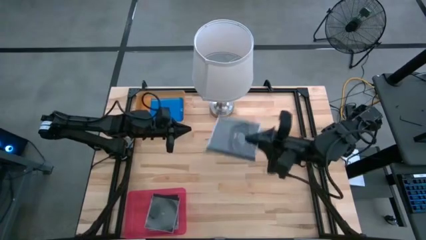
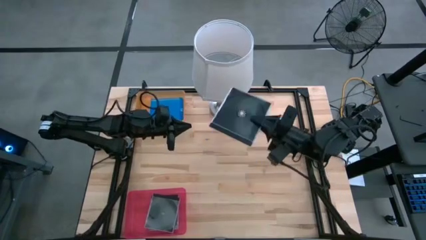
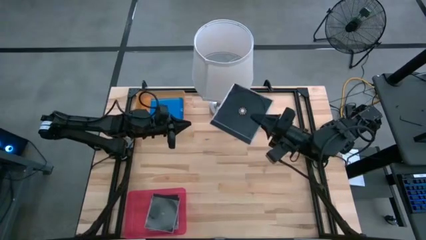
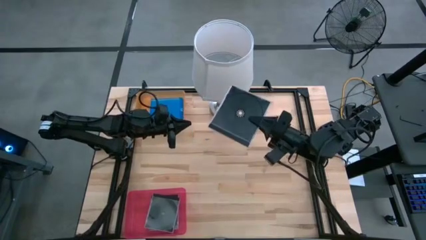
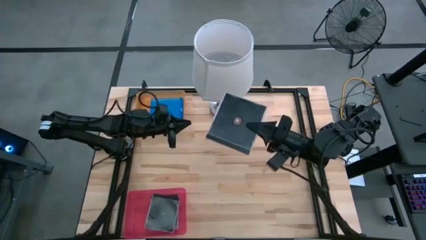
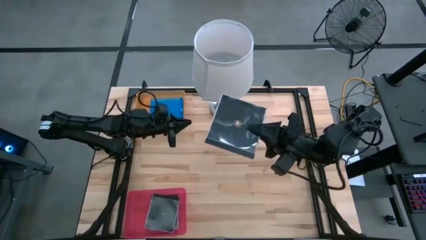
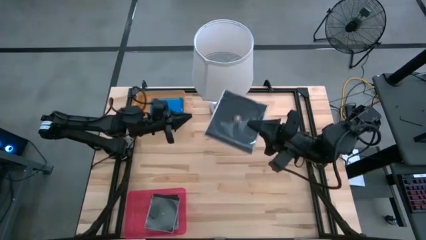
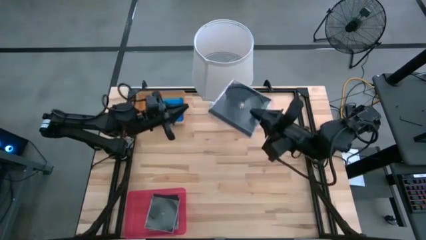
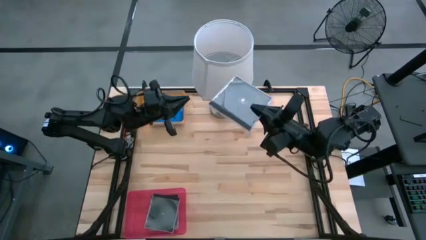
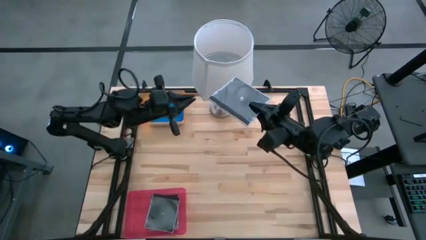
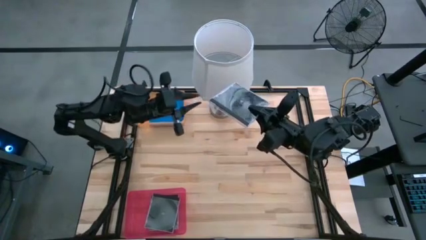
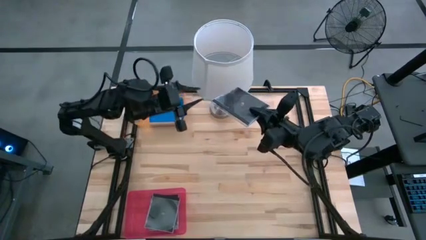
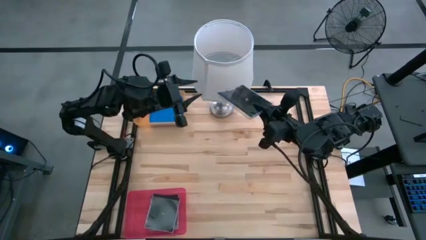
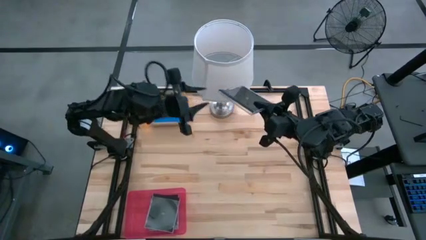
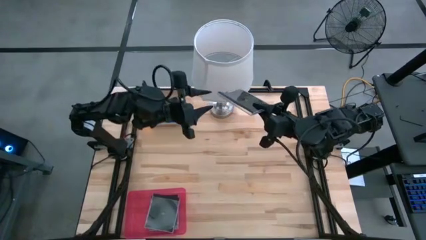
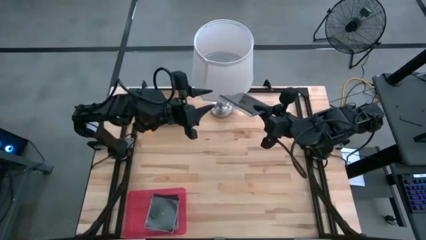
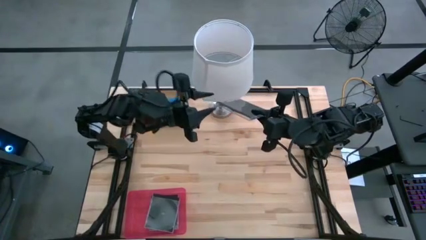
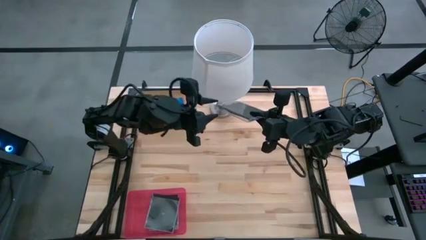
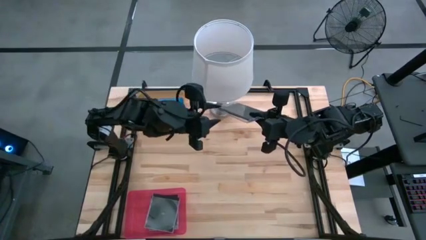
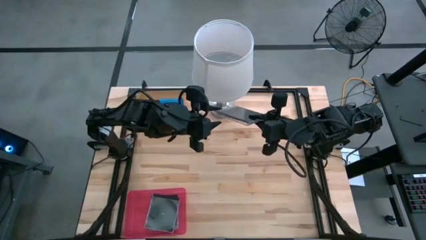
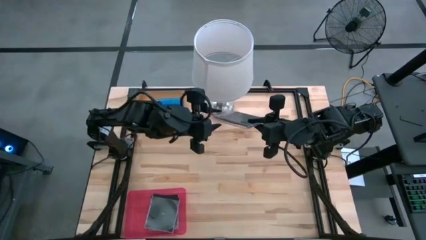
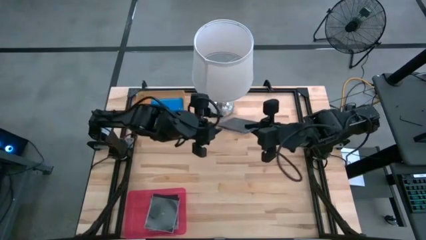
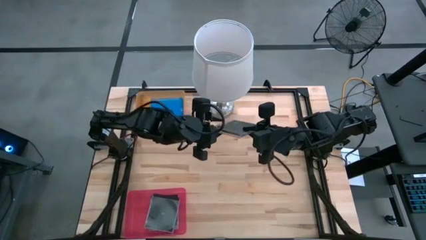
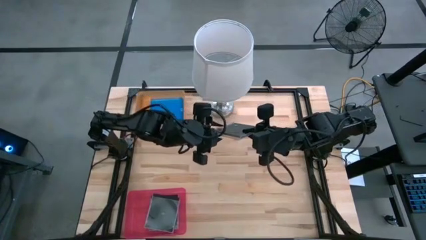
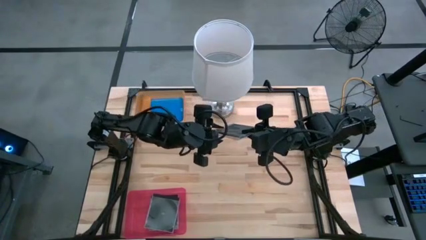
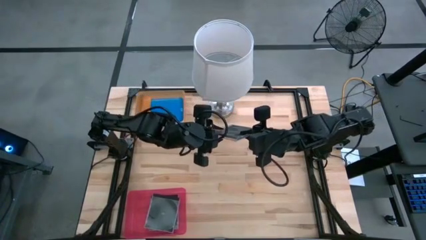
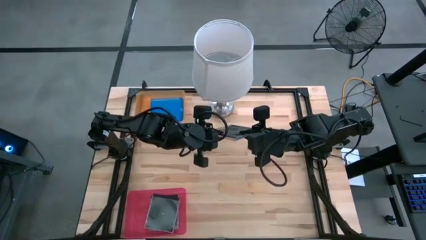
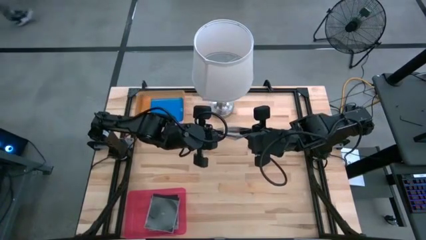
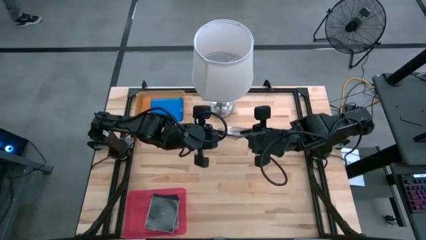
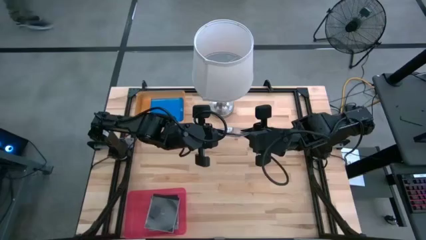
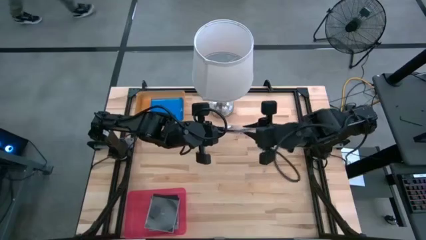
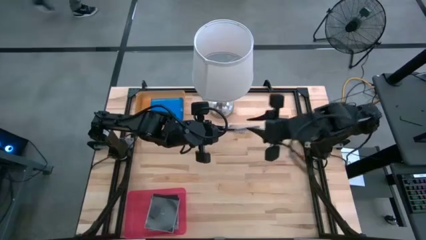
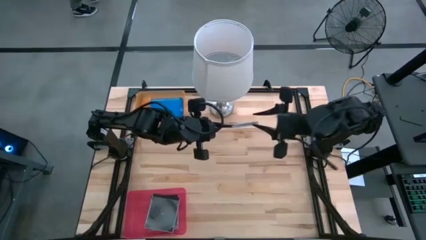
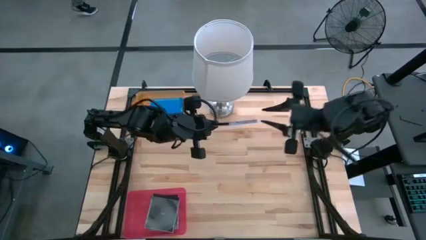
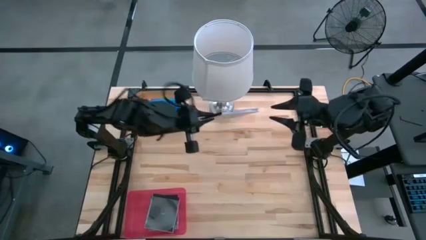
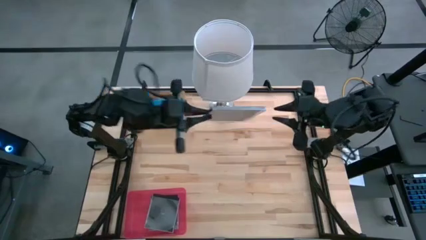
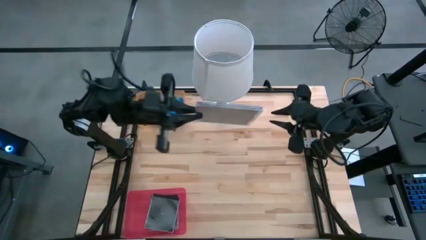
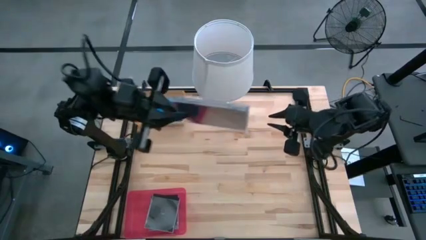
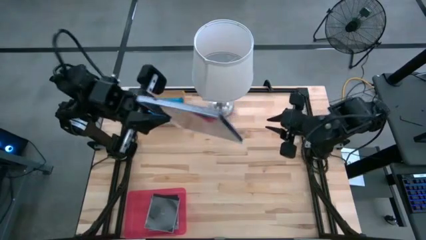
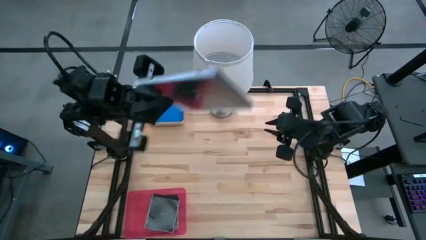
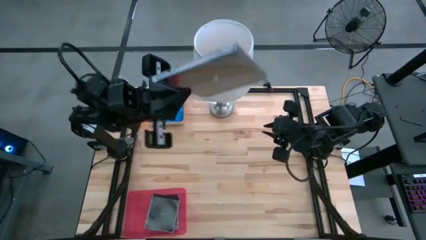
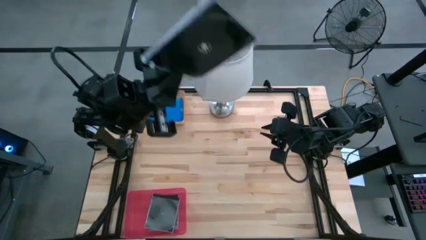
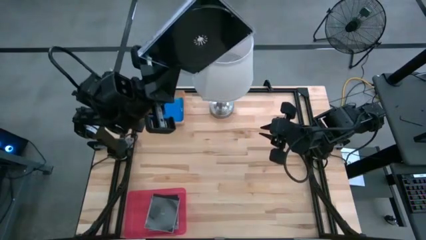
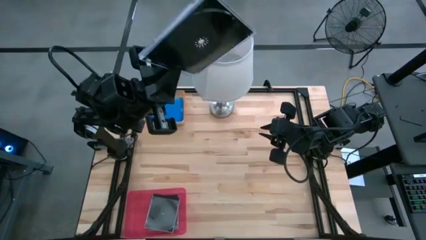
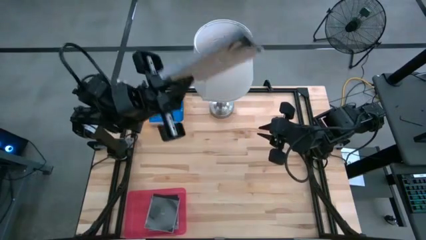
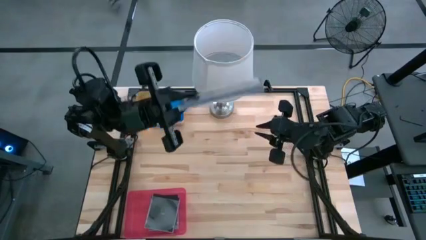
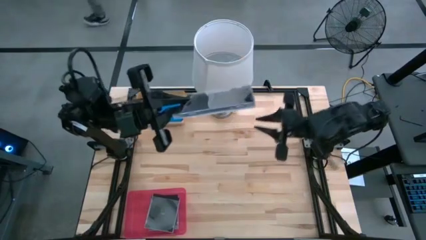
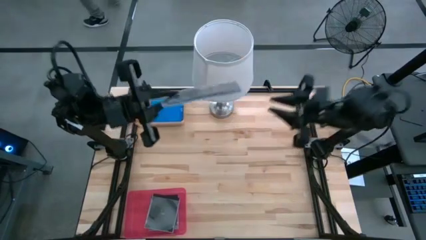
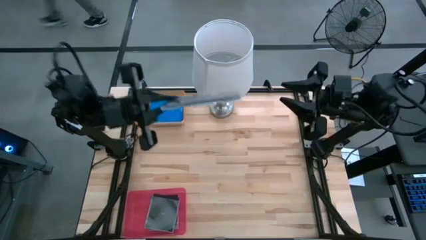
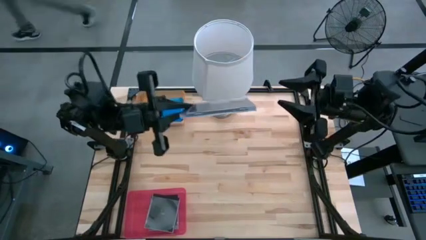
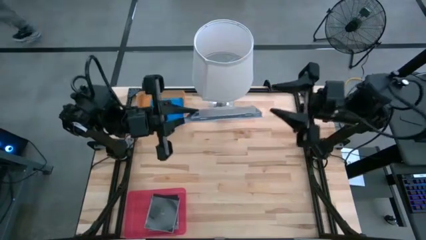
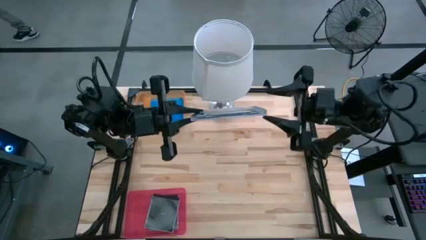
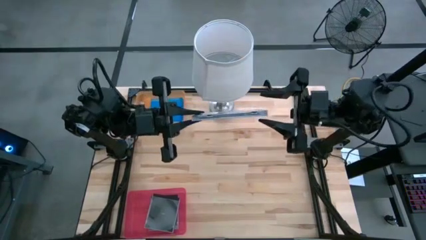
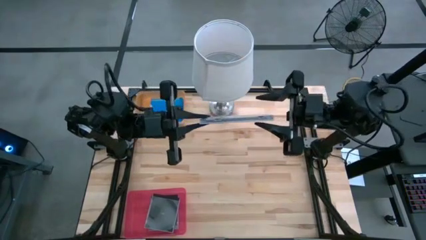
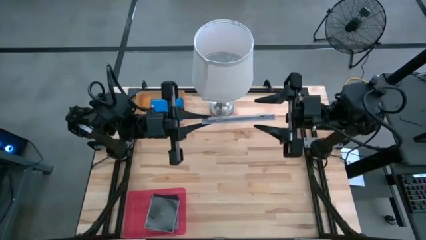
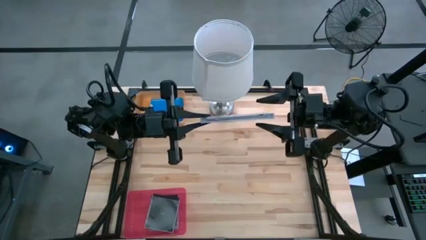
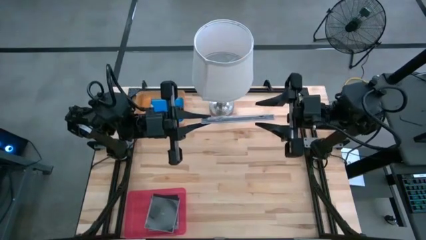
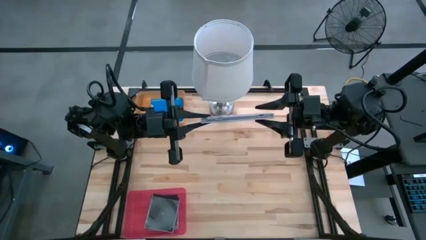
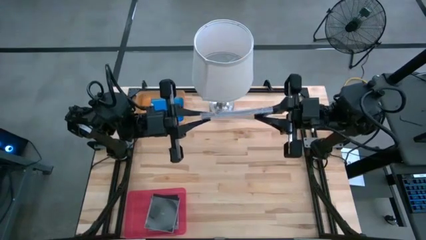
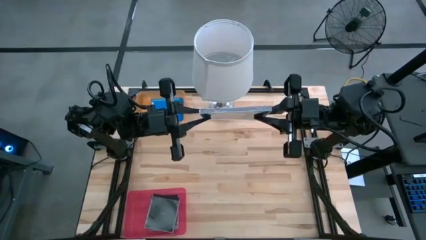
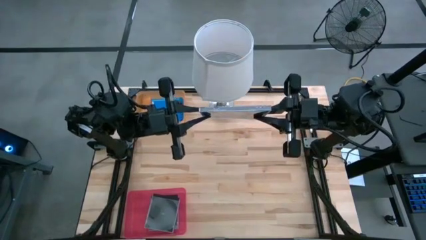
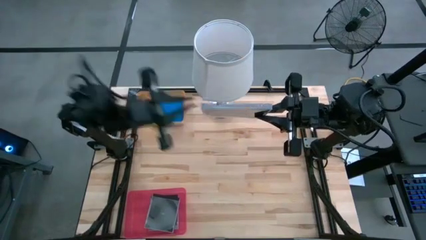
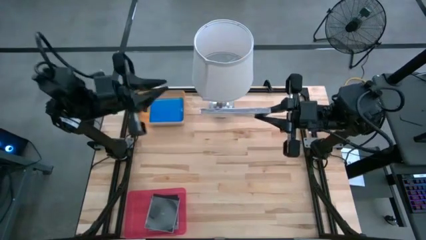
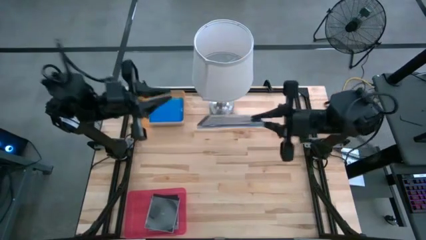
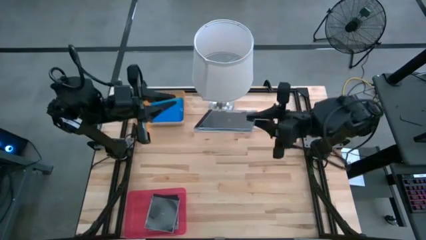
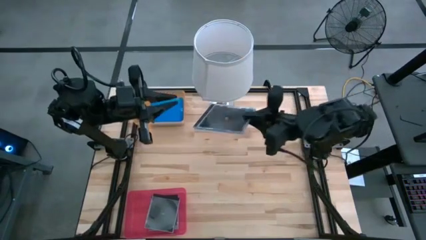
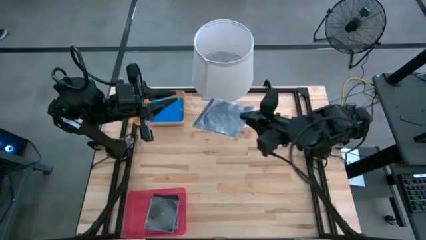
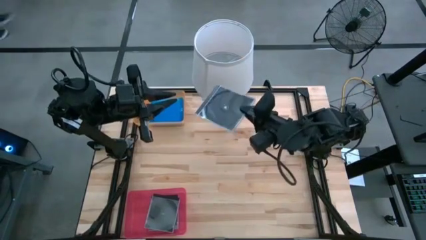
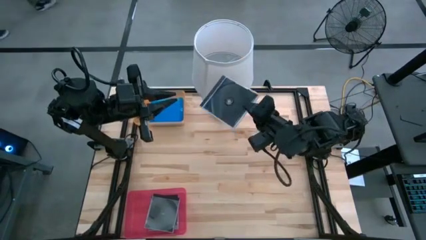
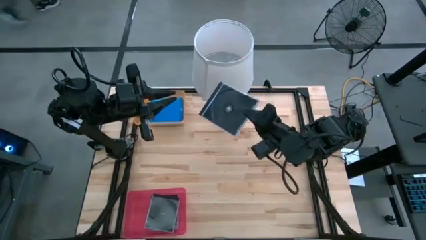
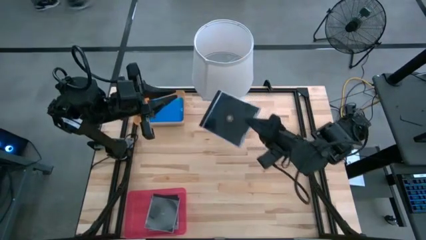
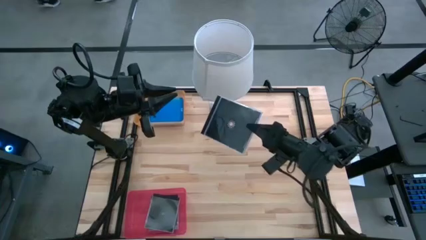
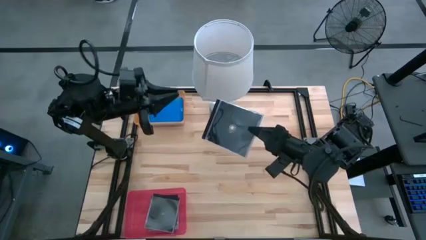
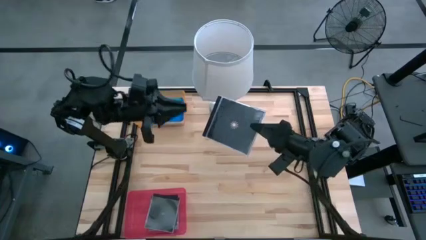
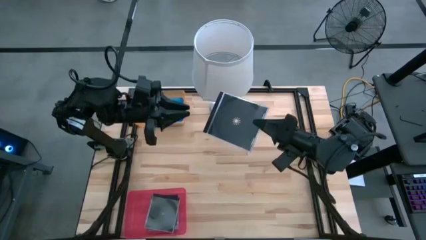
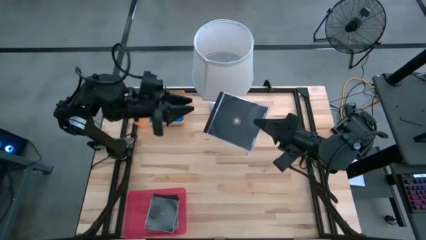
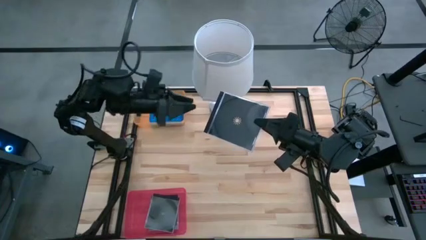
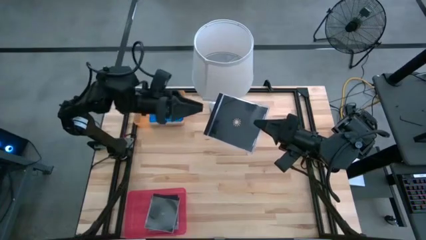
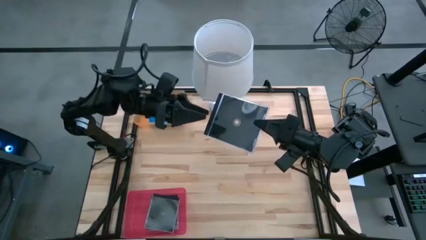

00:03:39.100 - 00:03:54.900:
Task: Pick & place jewel cases by type
Put the black cd case into the pink bin
